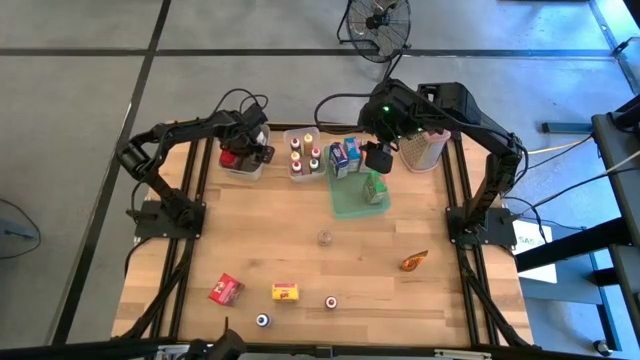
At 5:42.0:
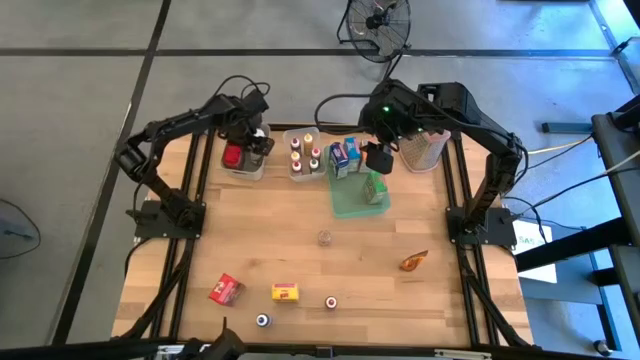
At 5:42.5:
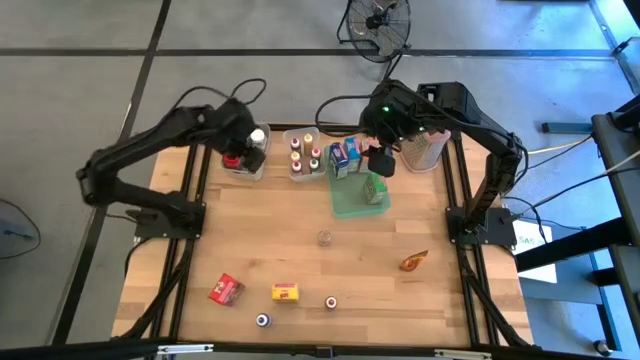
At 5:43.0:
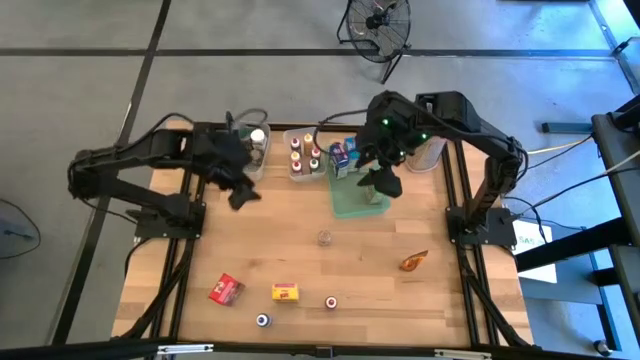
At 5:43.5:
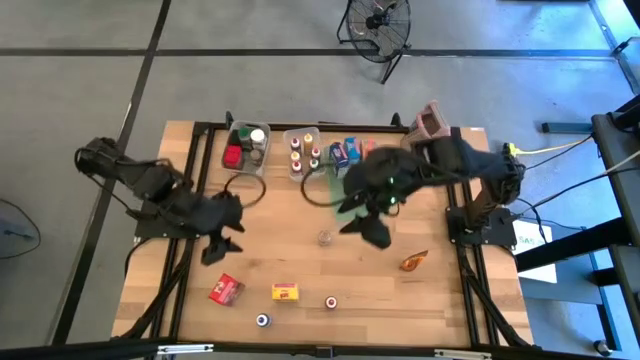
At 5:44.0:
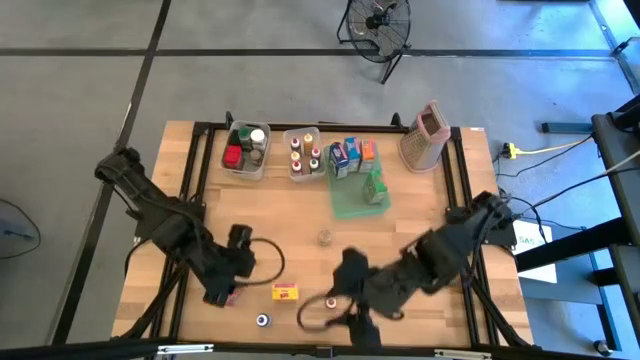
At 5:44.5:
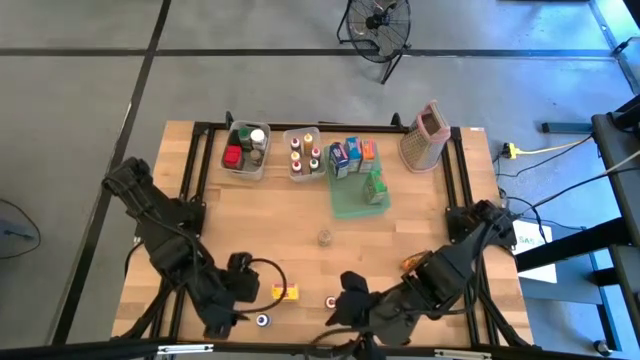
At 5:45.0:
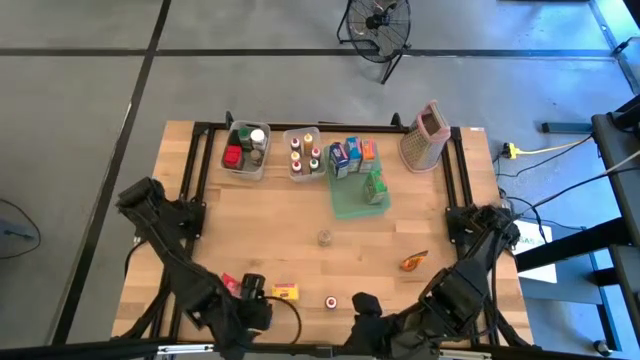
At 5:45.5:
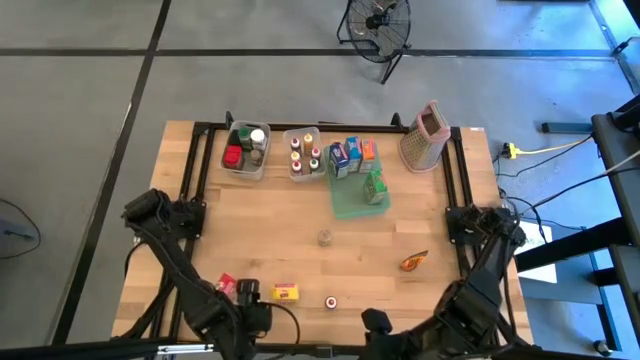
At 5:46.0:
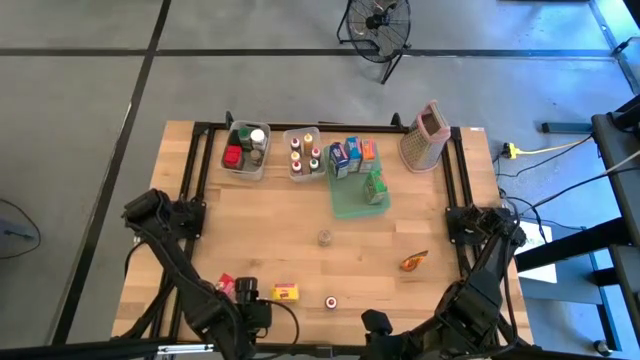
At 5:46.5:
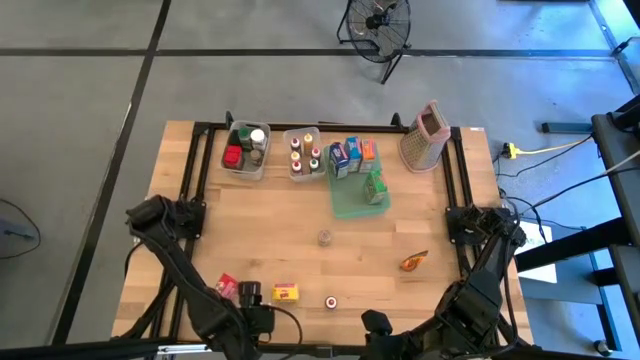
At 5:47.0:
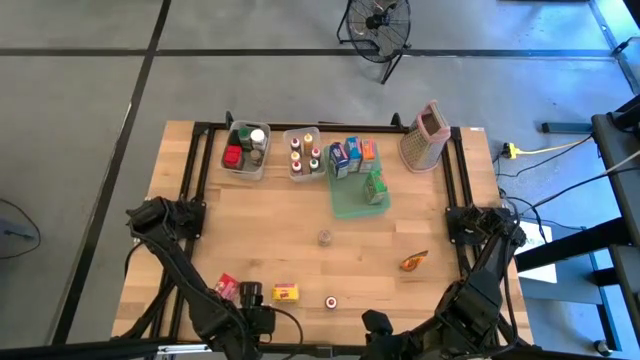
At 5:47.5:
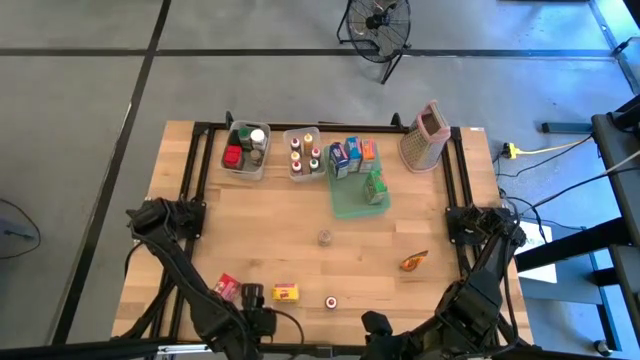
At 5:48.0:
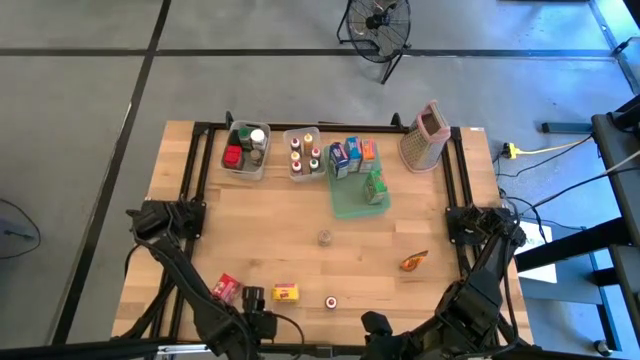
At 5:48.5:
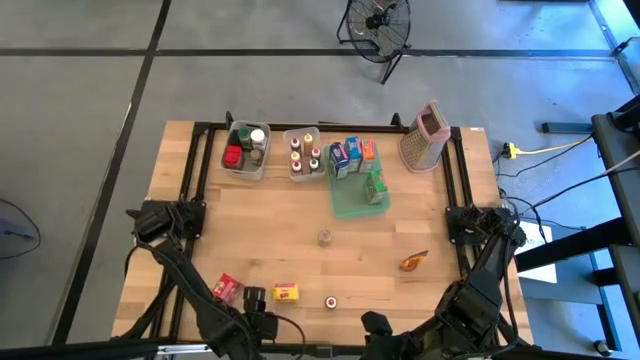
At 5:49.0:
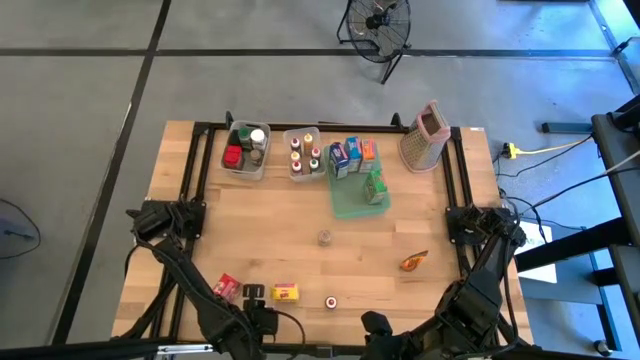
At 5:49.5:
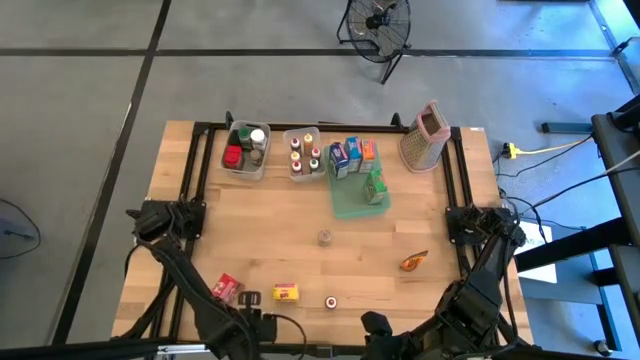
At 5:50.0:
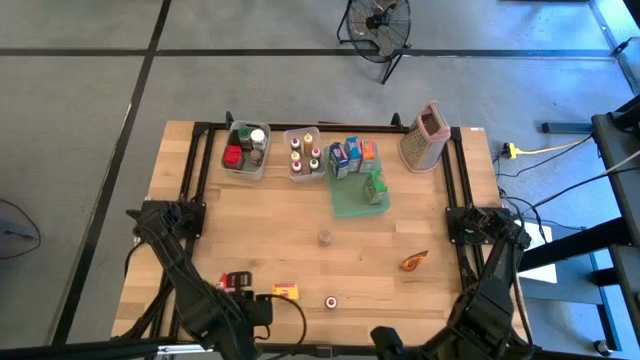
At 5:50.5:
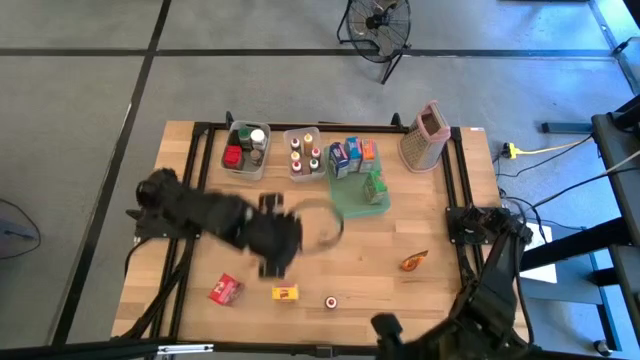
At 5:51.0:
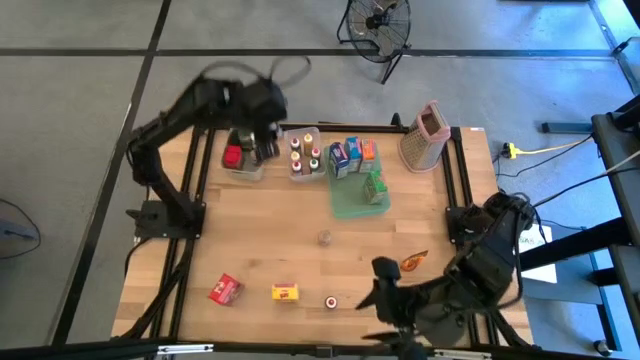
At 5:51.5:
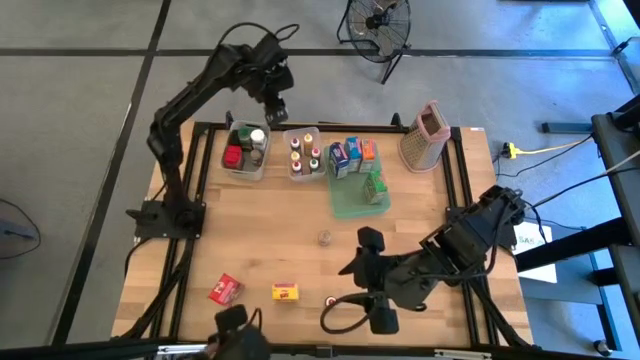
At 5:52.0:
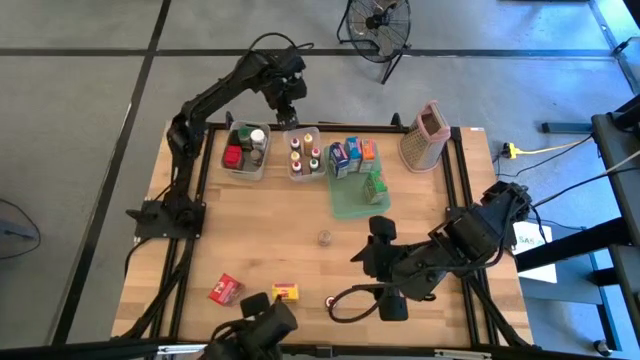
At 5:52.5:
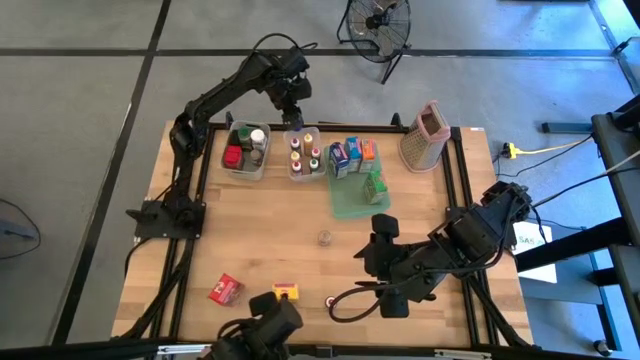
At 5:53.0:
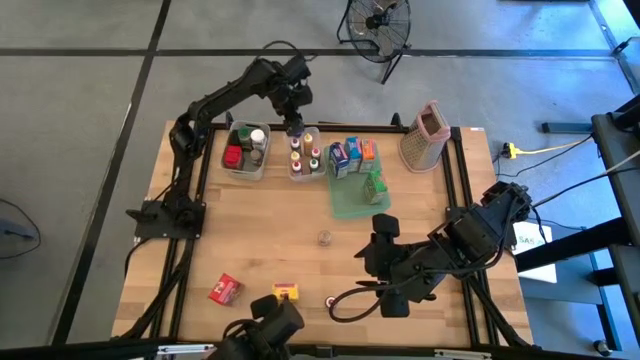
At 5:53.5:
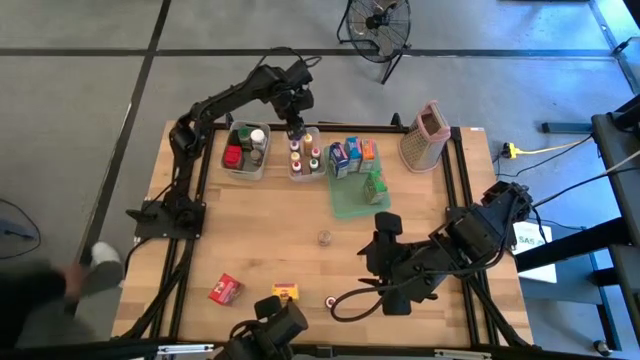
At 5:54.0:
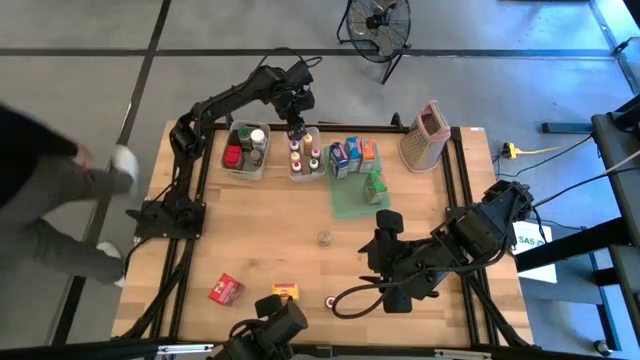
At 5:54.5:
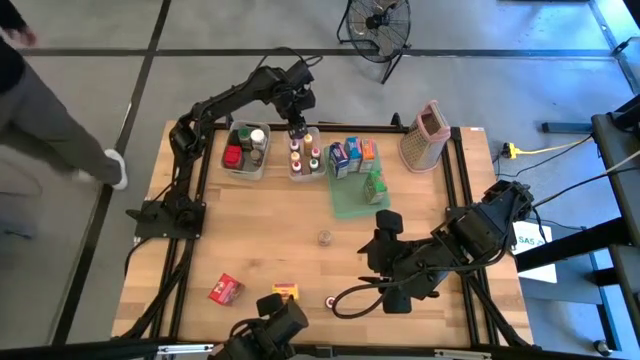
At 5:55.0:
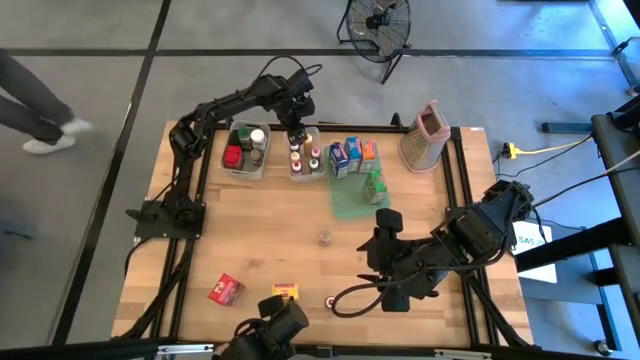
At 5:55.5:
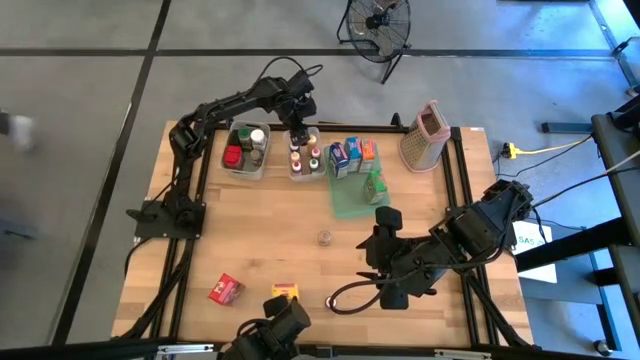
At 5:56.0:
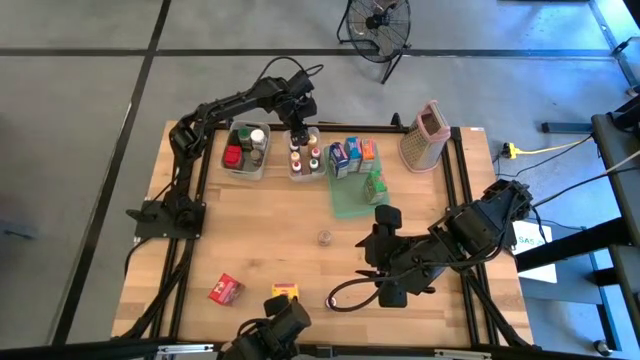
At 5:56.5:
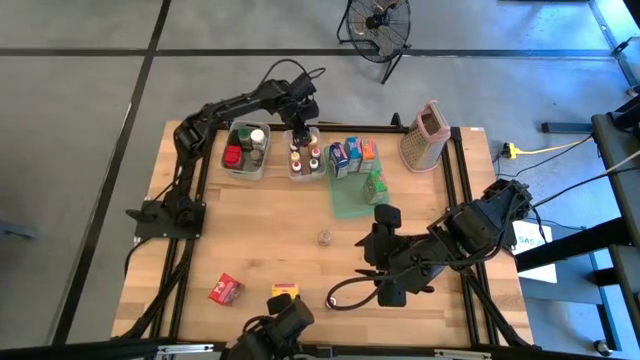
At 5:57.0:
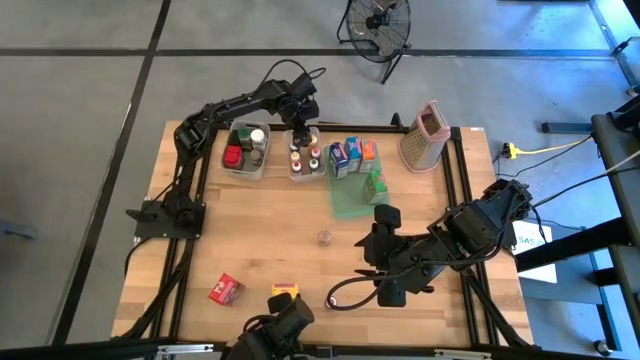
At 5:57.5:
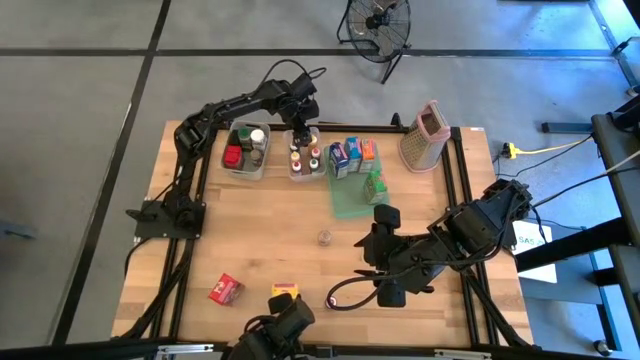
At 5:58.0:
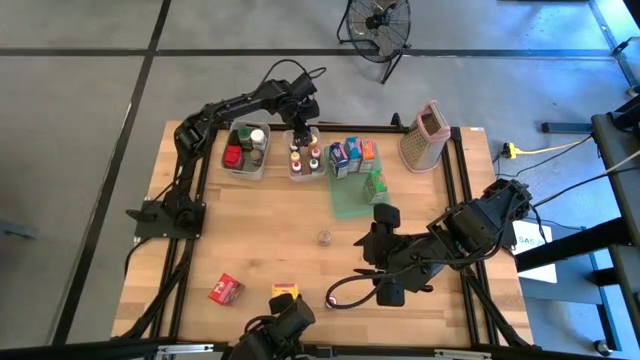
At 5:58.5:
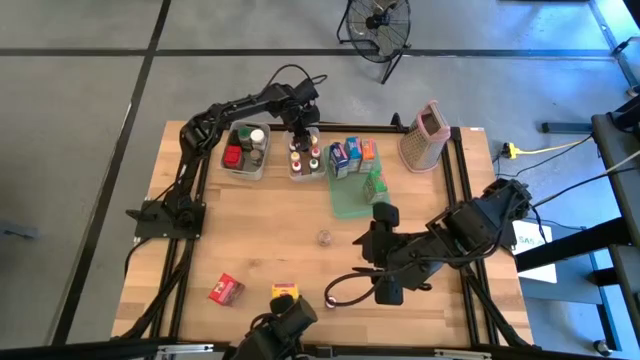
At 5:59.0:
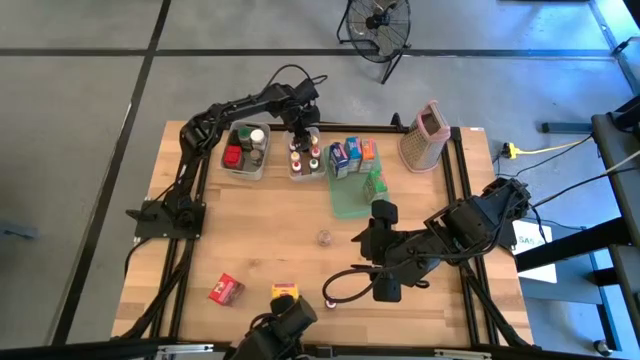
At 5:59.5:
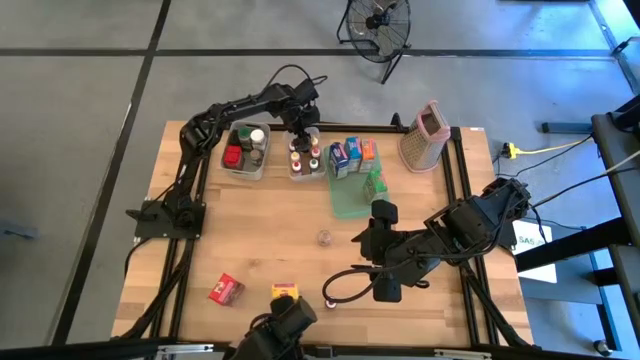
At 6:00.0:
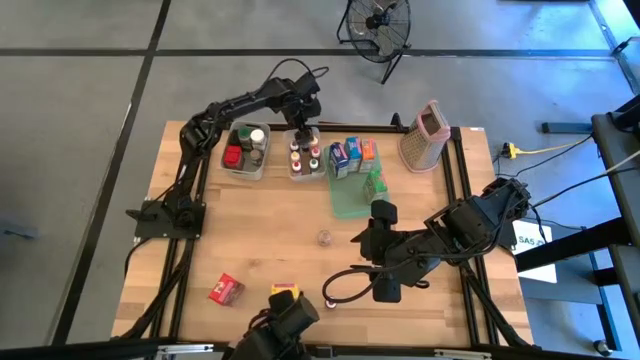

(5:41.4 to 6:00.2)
Task: Pick & Place Kitchen Items
Put the blue food coloring bottle into the transparent bin

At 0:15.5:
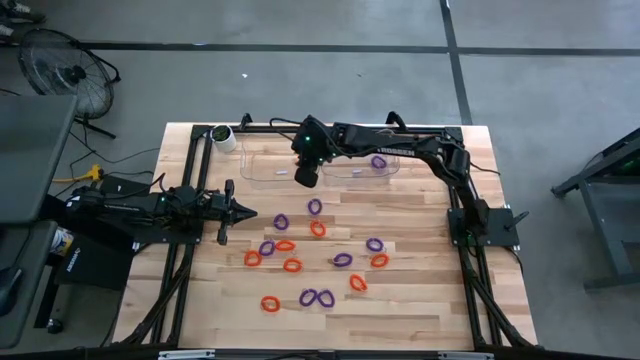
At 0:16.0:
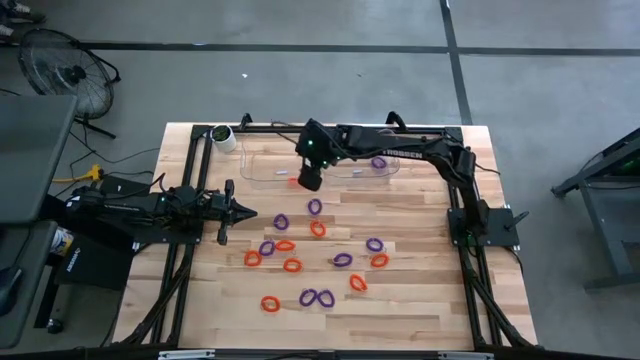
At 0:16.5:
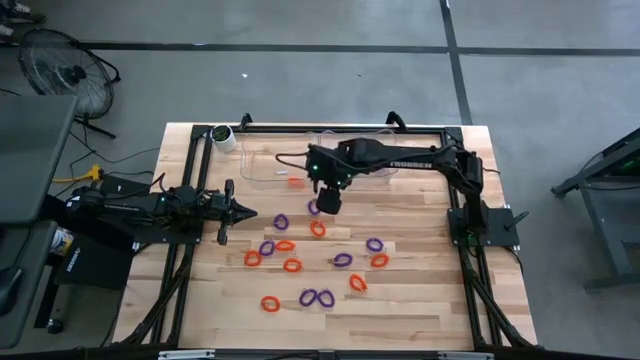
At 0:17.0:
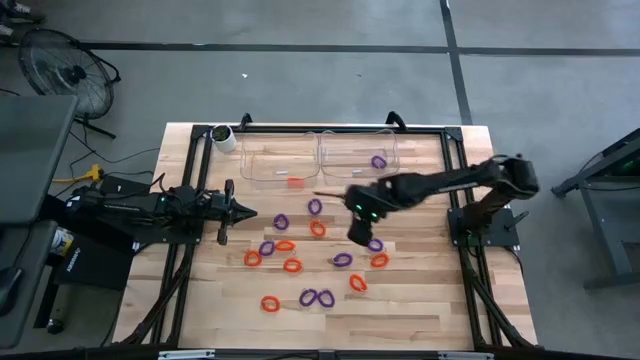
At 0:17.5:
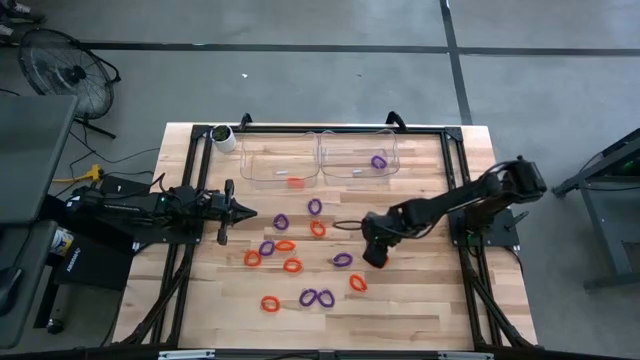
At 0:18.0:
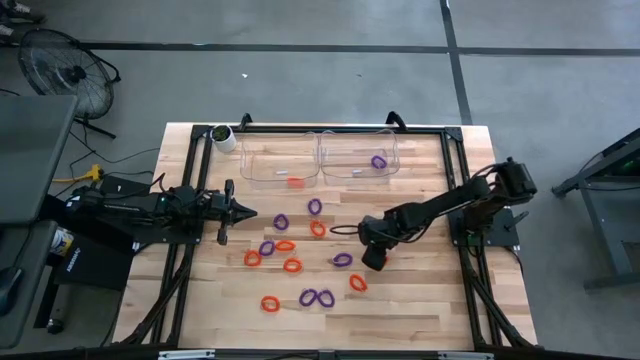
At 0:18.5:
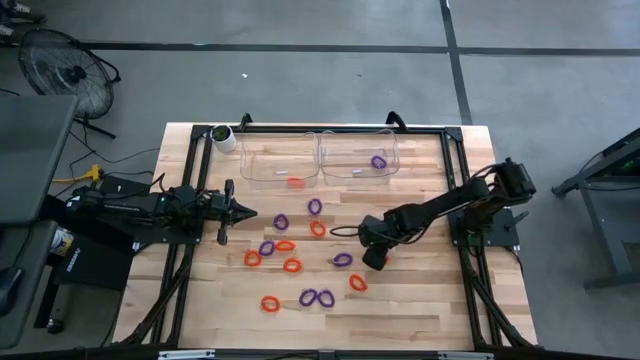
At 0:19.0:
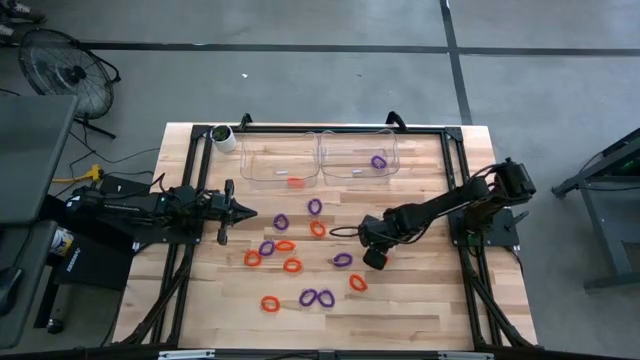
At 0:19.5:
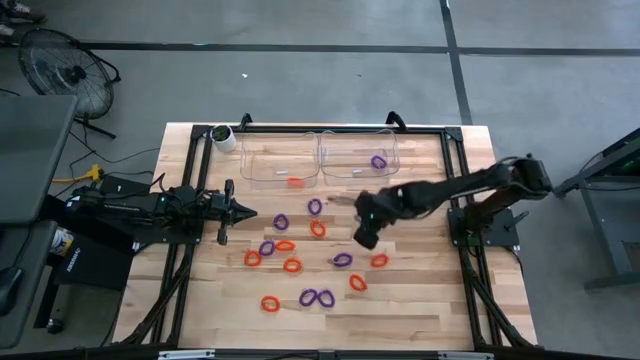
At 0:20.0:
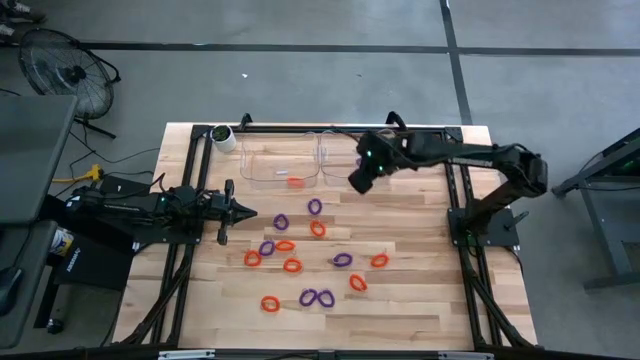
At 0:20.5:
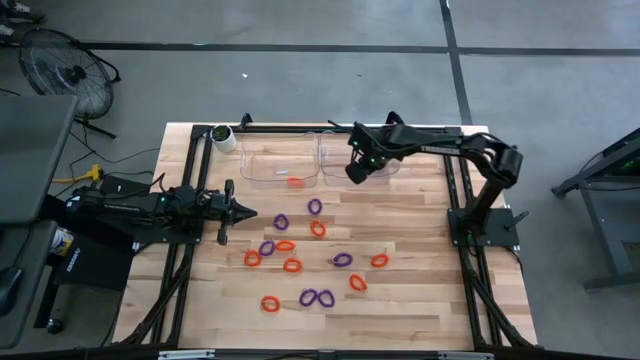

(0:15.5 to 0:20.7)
Task: Sort spring keychains
Put the violet spring keychain into the right bin
